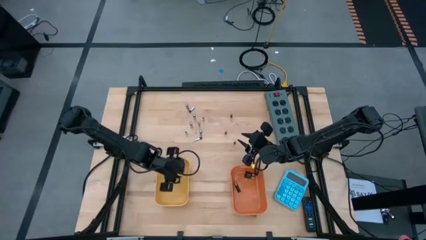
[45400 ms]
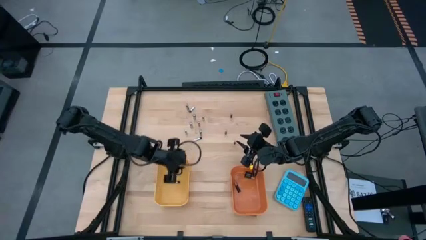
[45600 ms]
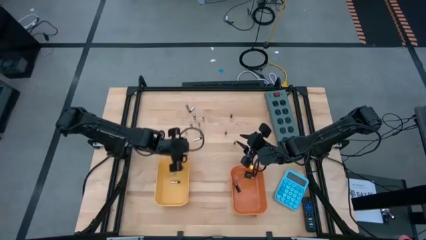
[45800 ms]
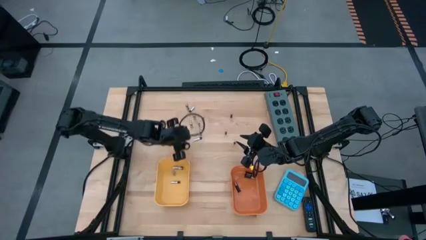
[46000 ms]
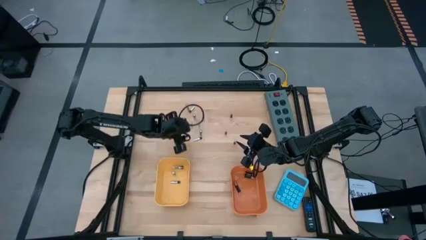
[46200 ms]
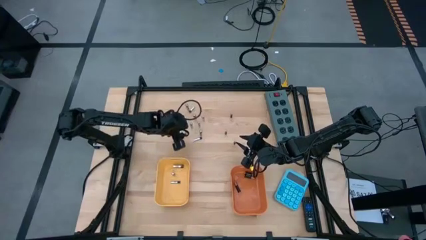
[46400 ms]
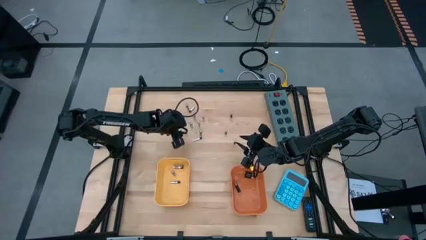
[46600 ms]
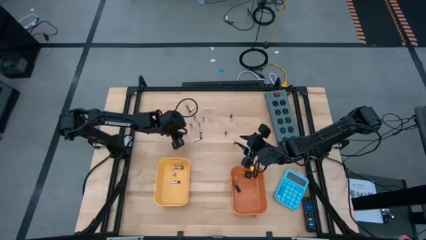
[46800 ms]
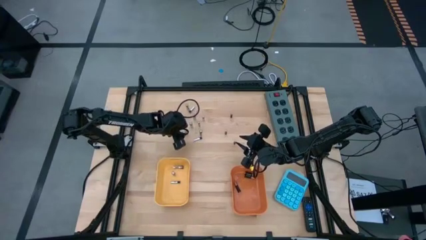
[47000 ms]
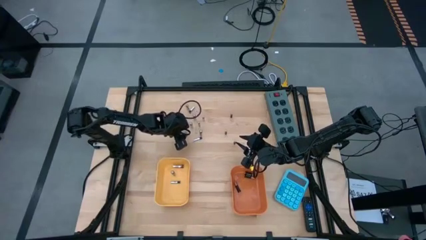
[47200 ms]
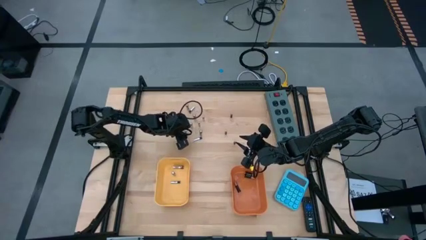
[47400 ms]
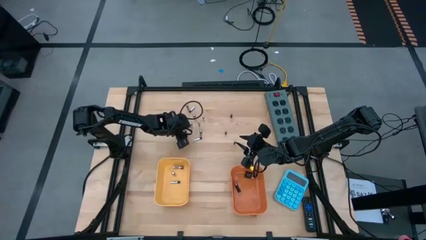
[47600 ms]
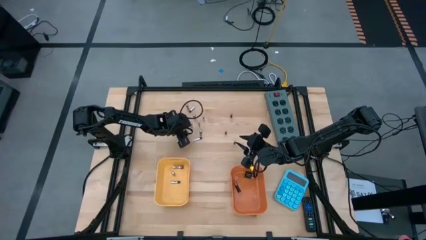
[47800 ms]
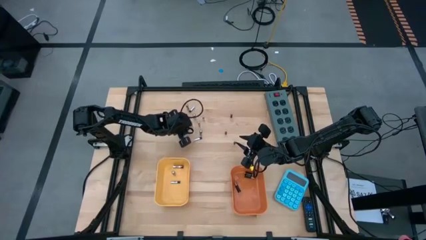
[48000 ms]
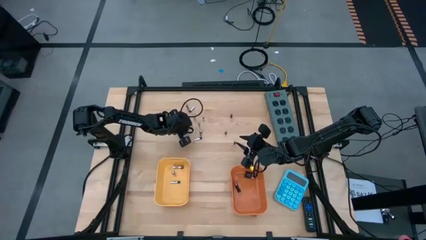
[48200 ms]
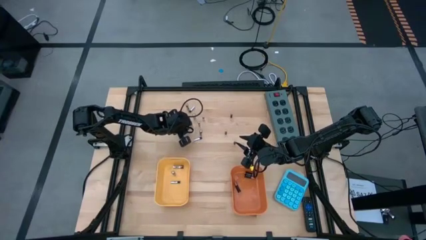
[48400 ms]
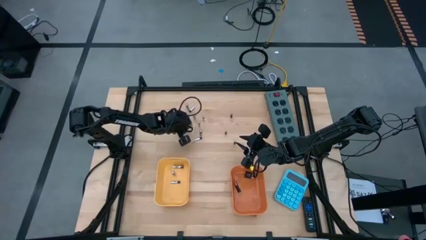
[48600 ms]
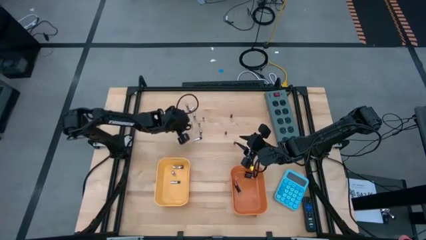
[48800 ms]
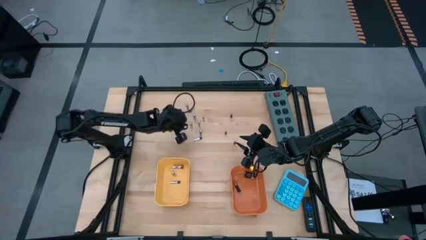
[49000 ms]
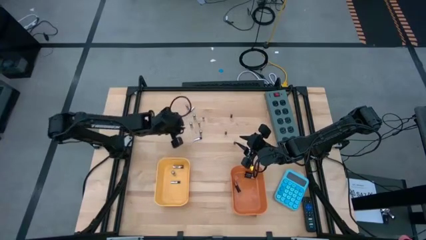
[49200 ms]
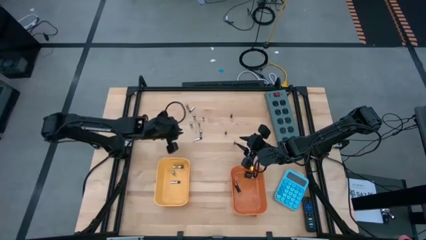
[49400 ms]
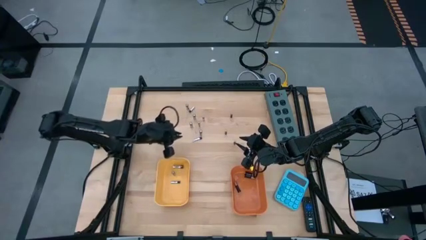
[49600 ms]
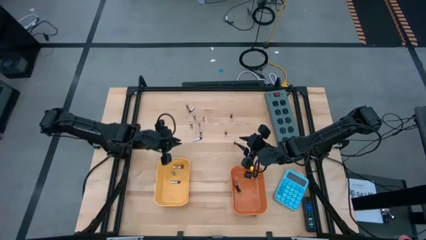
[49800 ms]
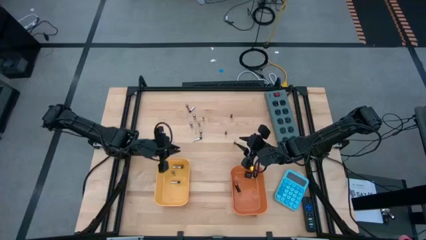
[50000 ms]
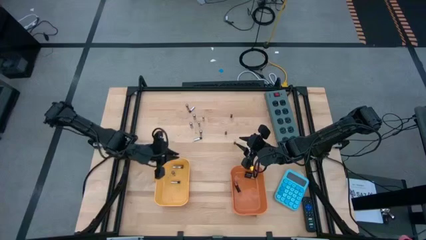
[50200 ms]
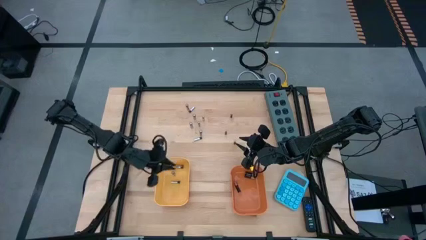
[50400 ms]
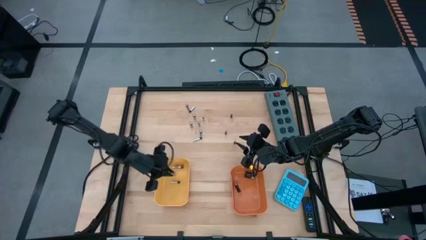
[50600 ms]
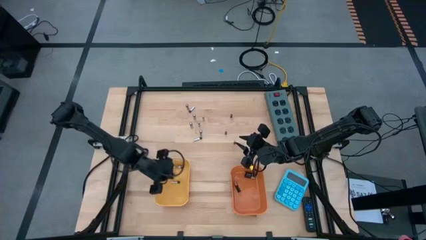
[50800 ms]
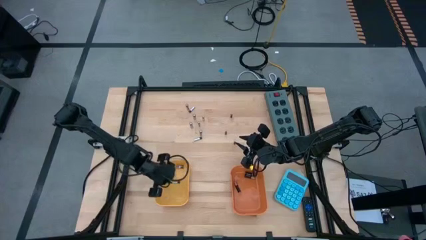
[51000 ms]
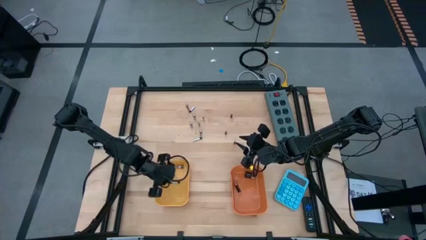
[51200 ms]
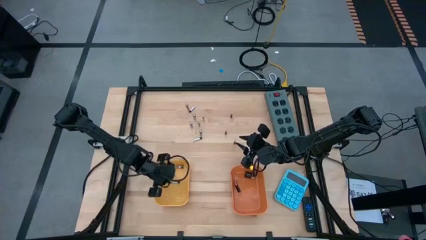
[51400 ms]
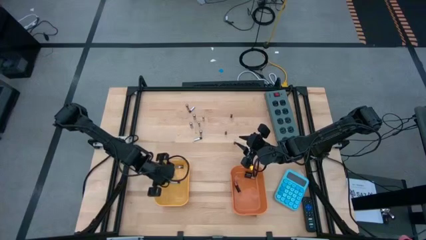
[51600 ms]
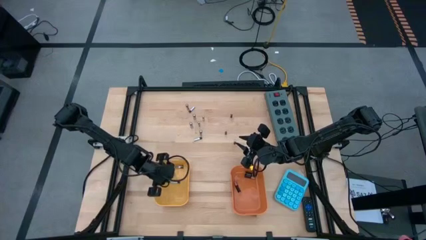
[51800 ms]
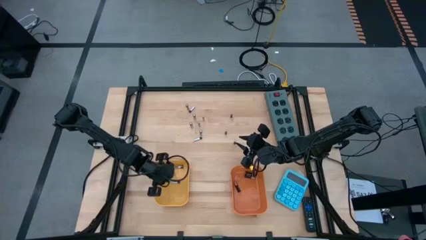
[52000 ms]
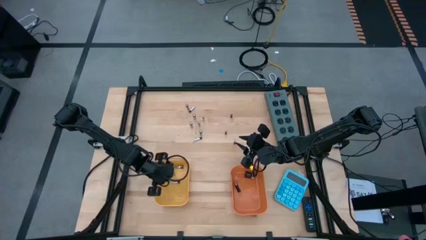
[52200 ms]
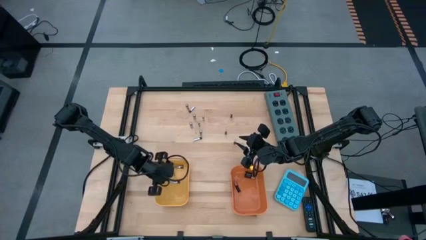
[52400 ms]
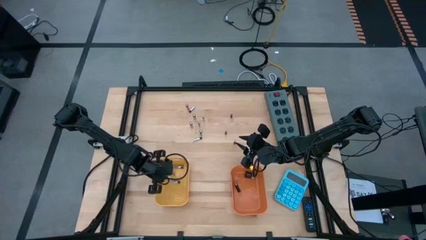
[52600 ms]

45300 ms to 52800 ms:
Task: Sort batteries
Put the silver battery into the yellow bin

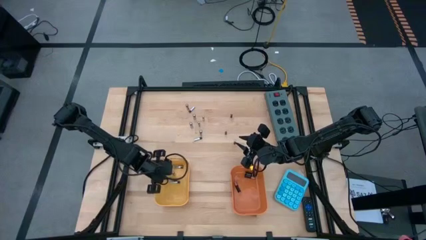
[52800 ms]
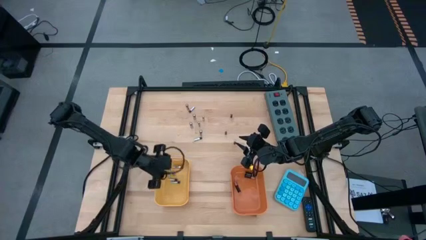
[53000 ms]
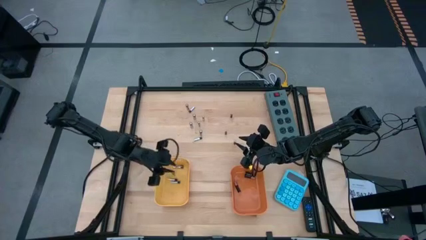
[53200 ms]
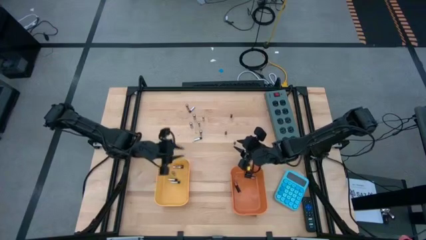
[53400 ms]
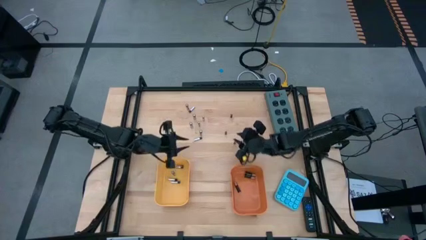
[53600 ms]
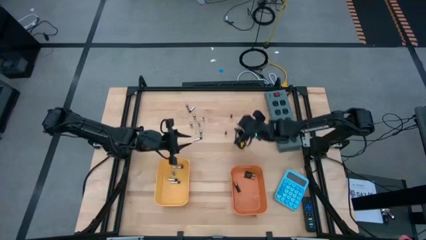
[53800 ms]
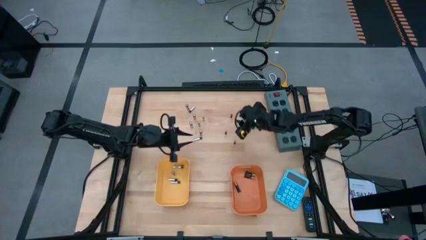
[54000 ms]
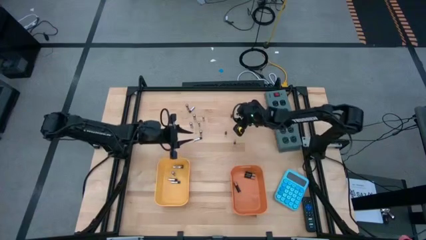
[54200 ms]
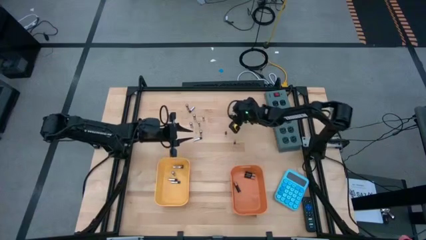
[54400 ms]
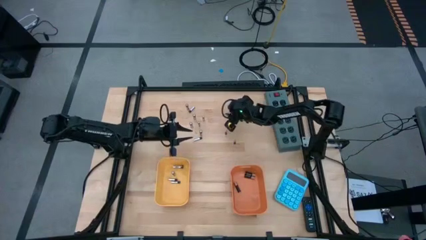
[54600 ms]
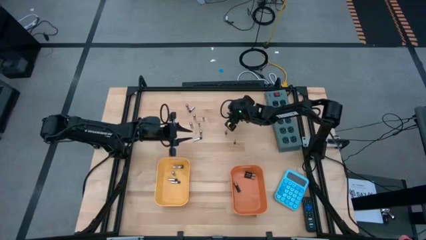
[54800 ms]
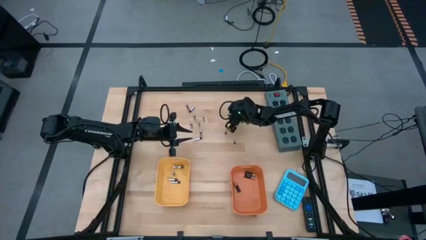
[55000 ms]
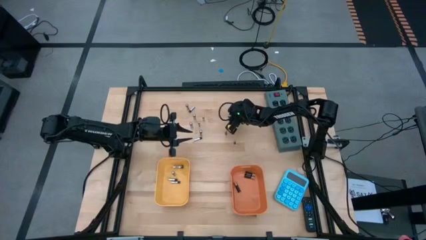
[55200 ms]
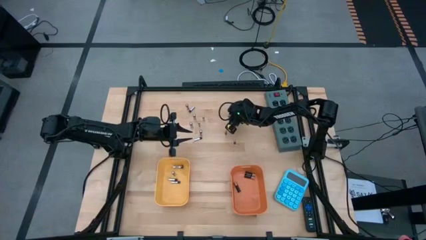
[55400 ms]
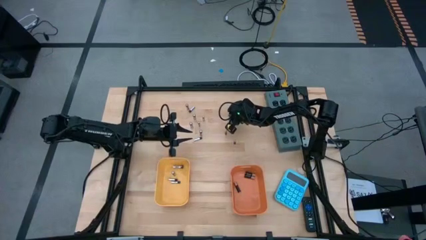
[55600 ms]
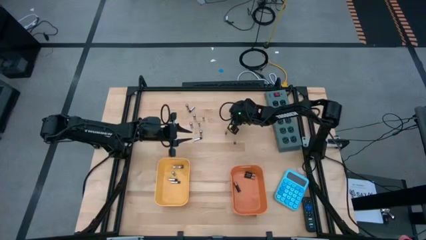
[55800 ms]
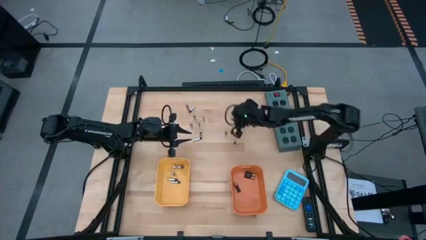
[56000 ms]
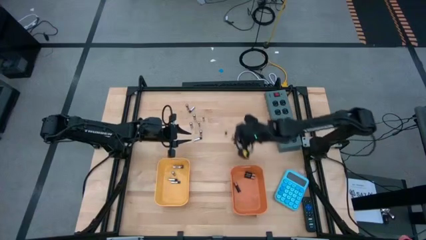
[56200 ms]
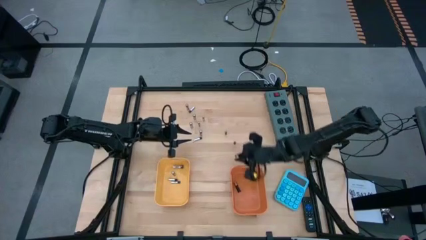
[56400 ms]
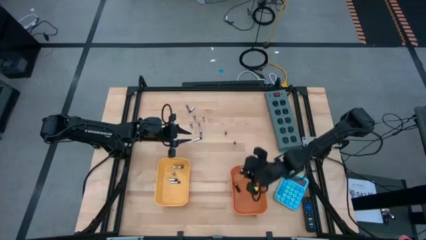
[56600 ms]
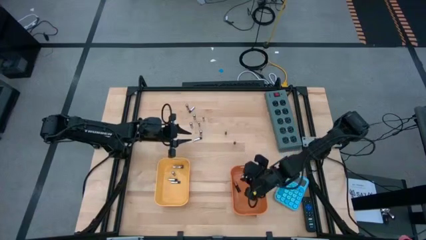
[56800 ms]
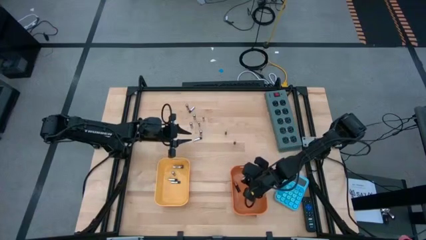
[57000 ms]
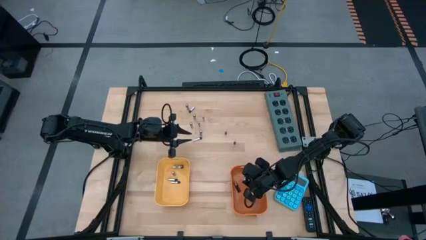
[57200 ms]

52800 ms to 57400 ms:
Put the black battery into the orange bin

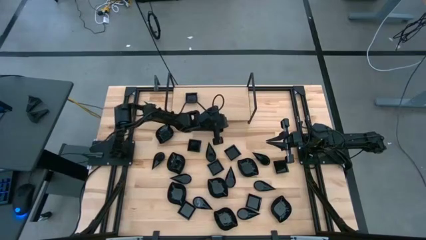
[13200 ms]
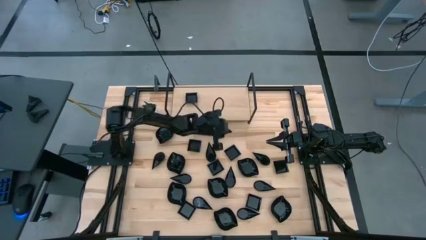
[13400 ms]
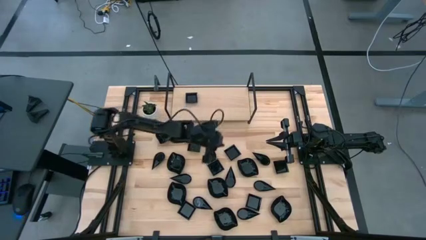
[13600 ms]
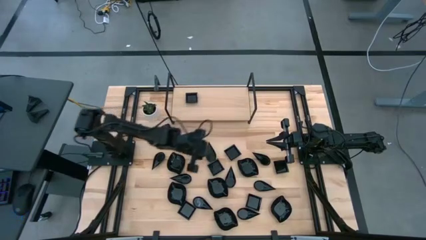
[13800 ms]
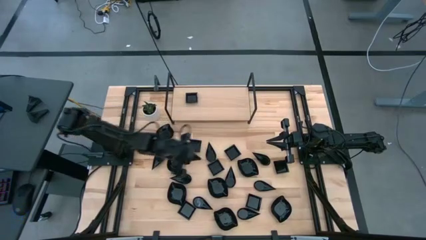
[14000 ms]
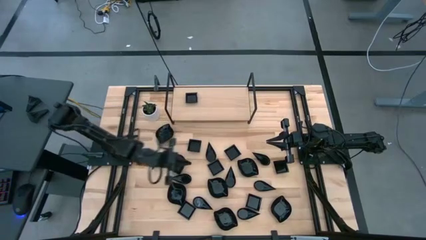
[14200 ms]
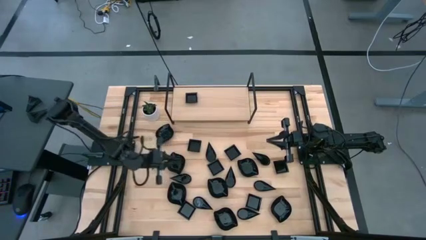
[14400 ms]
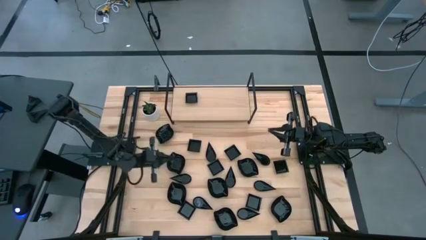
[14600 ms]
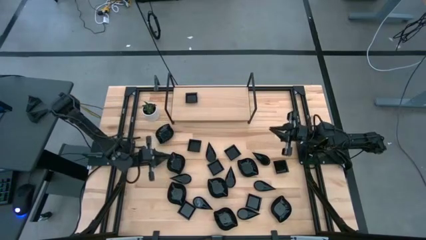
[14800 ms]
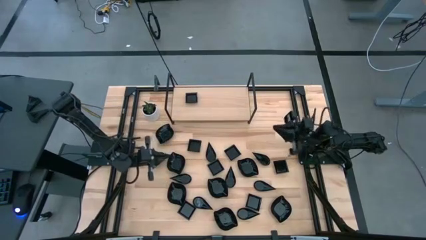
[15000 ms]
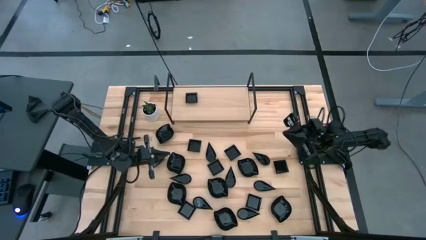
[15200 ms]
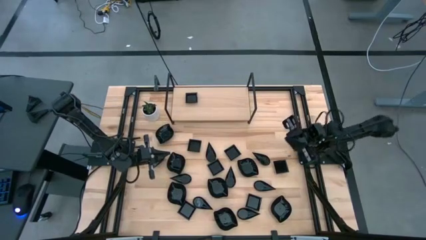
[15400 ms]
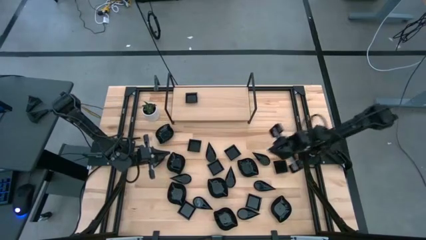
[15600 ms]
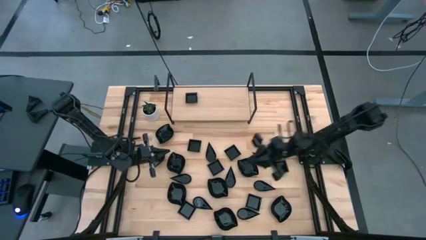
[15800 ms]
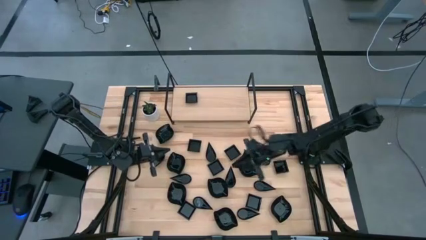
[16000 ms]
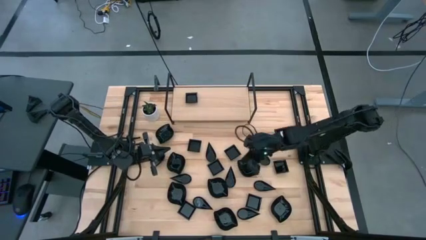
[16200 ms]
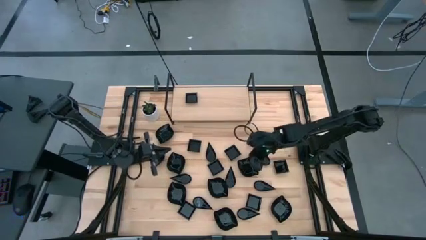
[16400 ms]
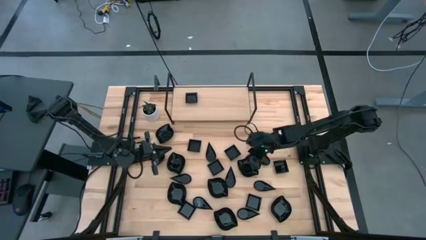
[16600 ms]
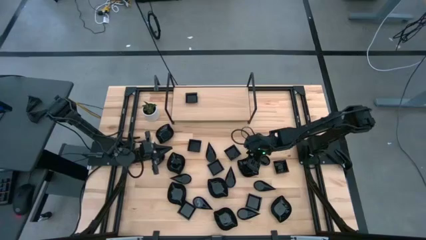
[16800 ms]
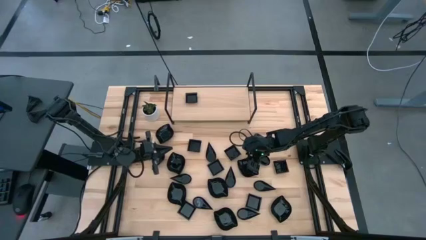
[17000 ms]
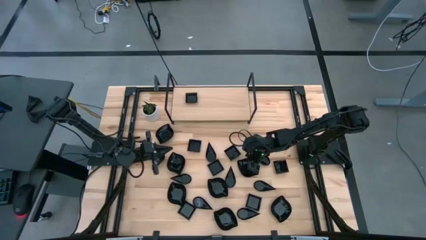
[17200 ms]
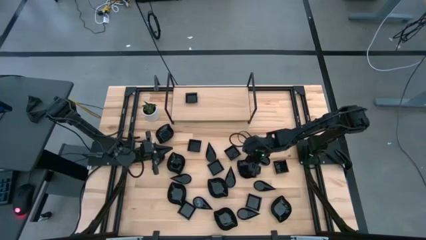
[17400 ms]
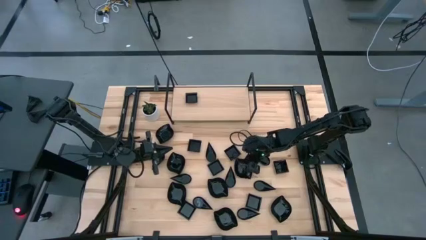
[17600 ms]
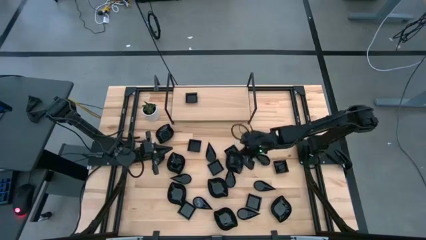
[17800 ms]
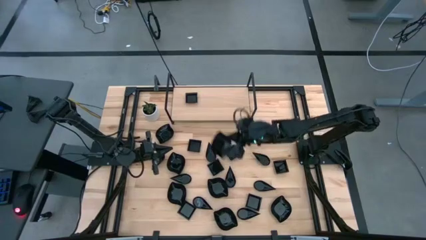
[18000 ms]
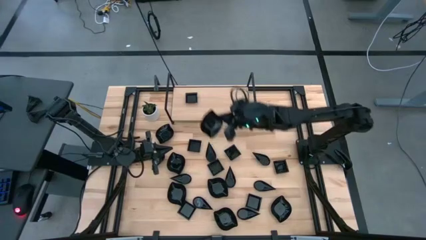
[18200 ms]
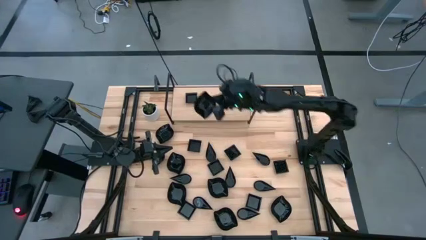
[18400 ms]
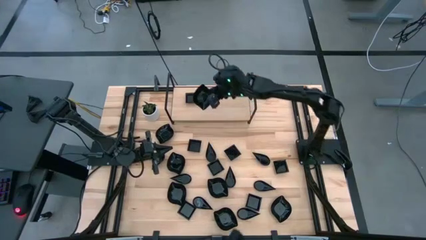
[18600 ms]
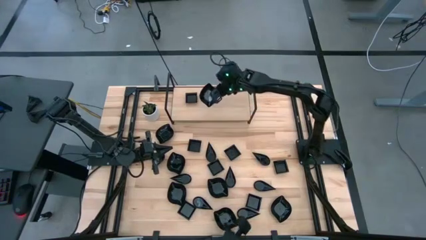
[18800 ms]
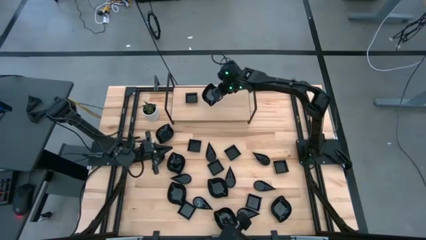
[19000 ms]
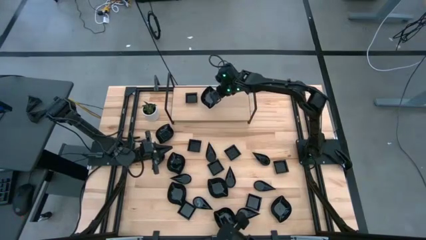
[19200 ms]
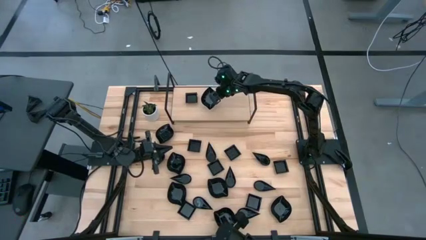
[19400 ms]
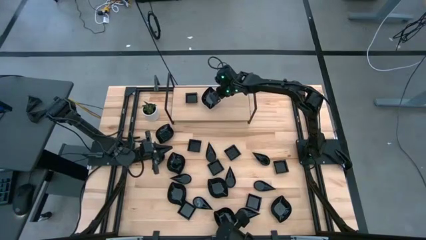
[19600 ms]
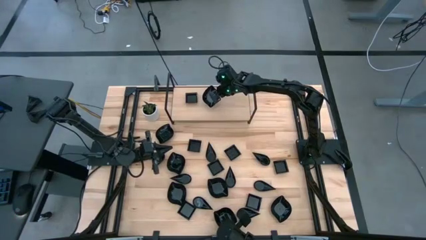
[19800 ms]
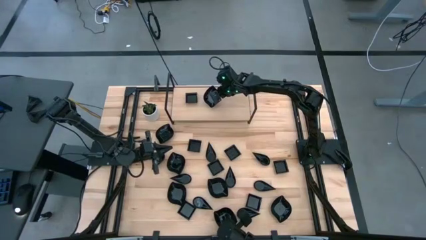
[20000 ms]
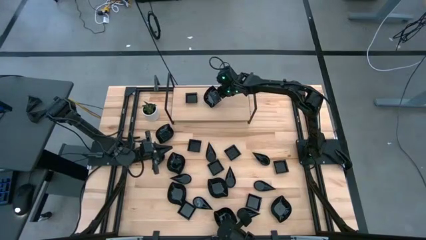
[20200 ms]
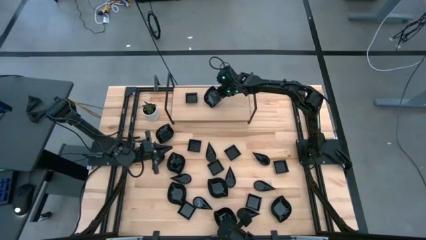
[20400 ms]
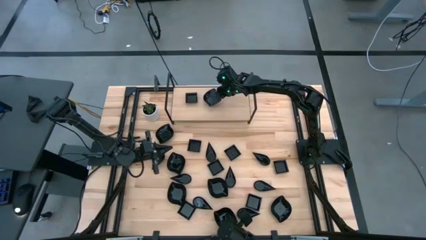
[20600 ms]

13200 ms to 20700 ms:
Task: Pick & Place Mini shaped plates
Put the black leaf shaped bowl on the shelf
